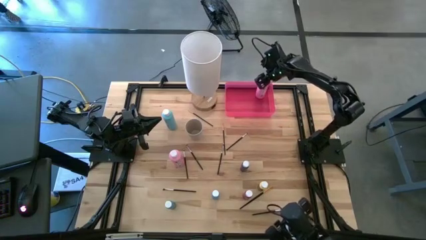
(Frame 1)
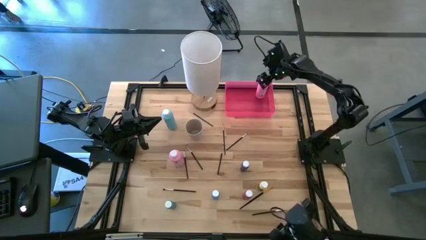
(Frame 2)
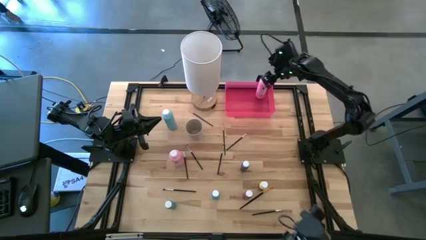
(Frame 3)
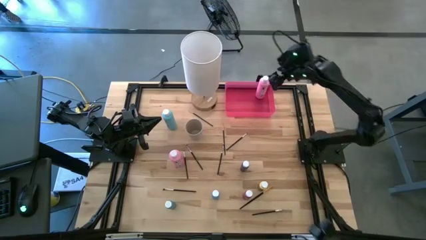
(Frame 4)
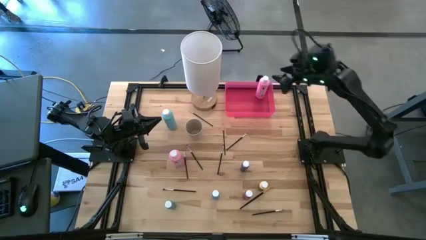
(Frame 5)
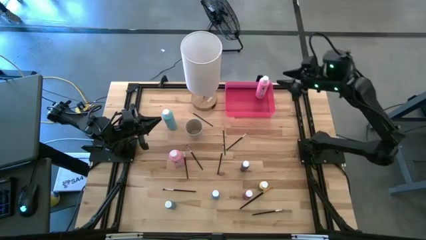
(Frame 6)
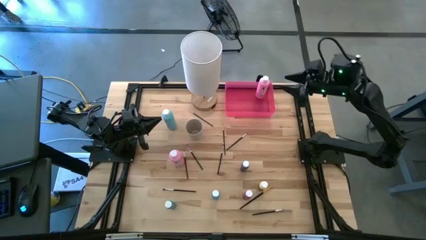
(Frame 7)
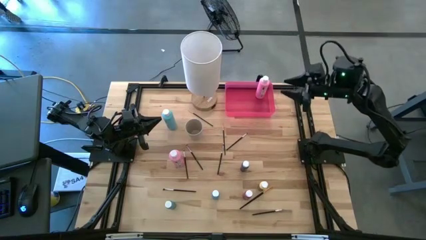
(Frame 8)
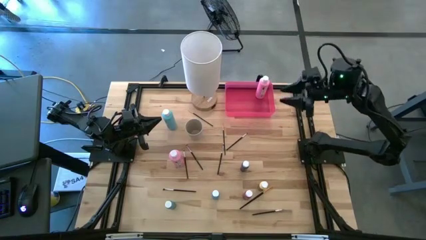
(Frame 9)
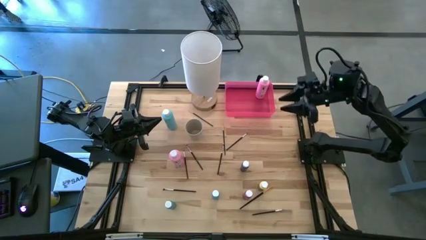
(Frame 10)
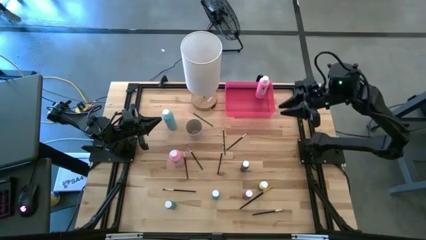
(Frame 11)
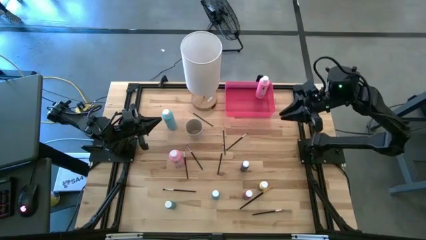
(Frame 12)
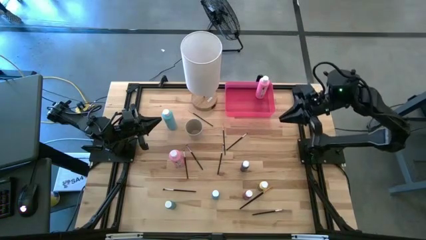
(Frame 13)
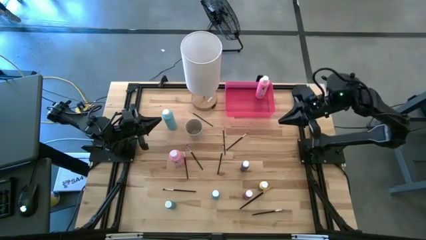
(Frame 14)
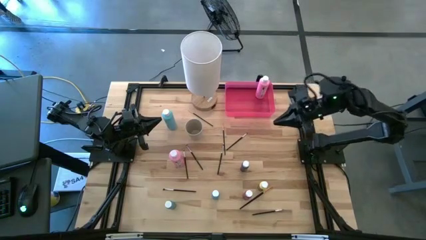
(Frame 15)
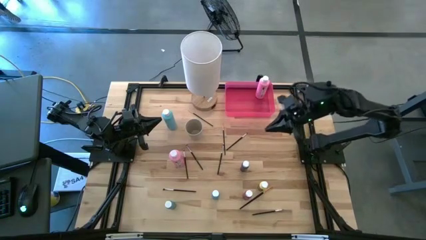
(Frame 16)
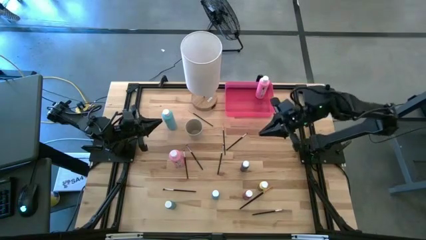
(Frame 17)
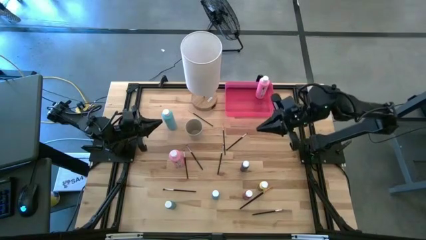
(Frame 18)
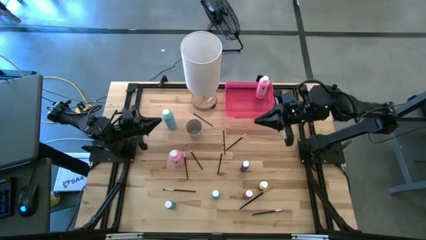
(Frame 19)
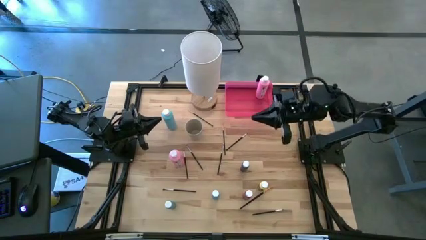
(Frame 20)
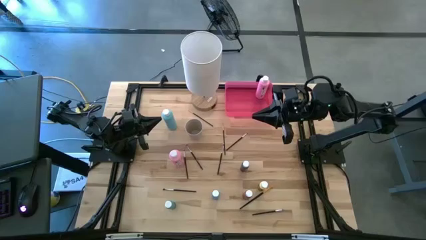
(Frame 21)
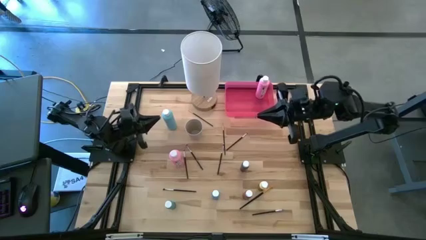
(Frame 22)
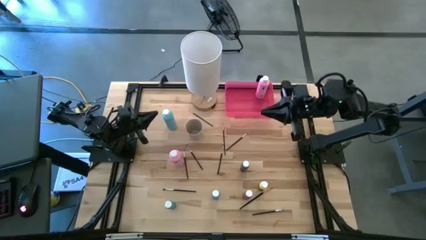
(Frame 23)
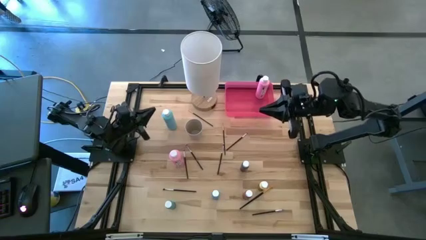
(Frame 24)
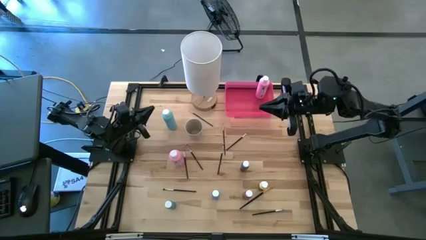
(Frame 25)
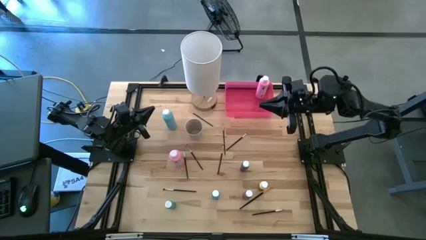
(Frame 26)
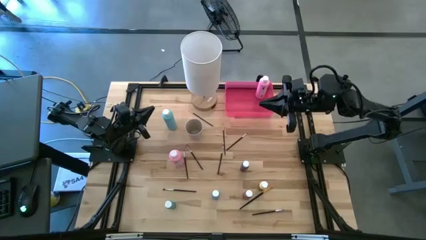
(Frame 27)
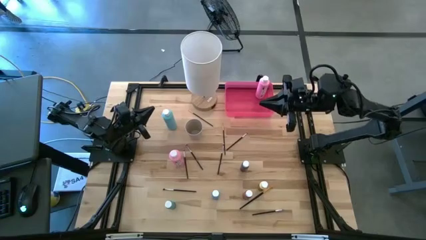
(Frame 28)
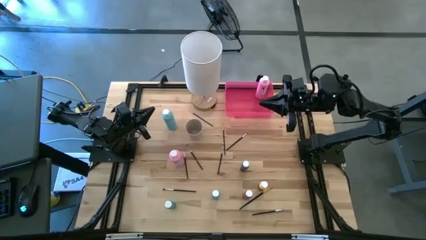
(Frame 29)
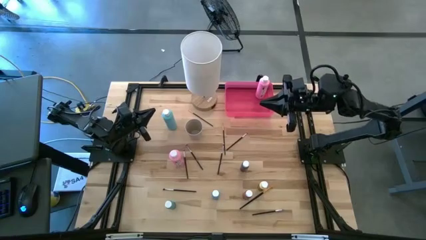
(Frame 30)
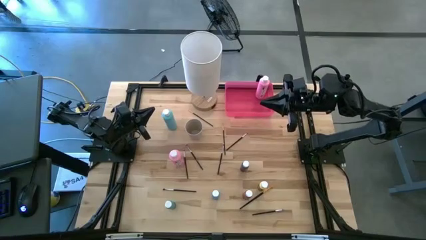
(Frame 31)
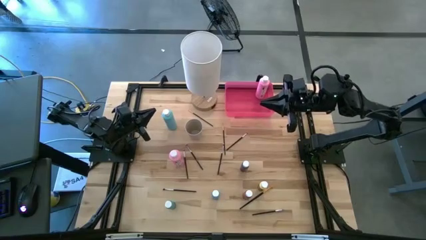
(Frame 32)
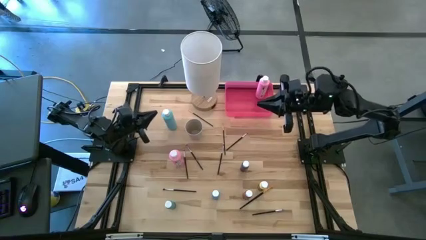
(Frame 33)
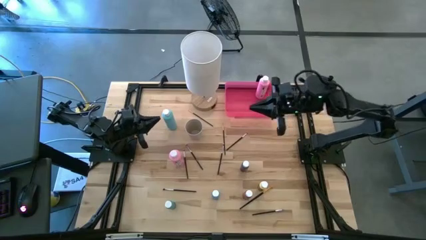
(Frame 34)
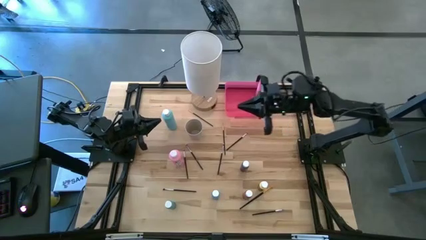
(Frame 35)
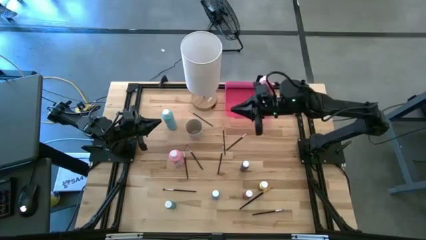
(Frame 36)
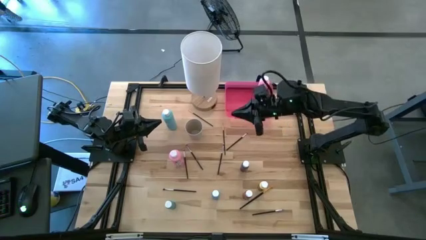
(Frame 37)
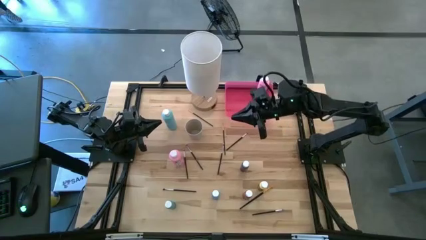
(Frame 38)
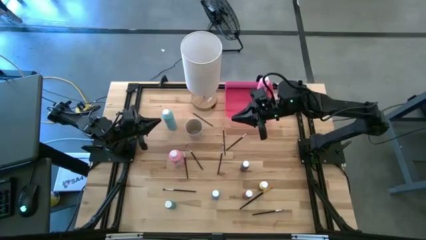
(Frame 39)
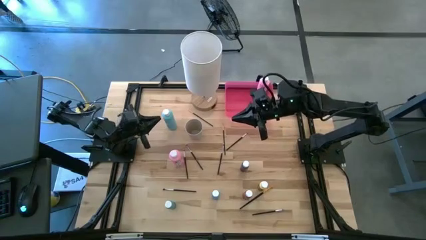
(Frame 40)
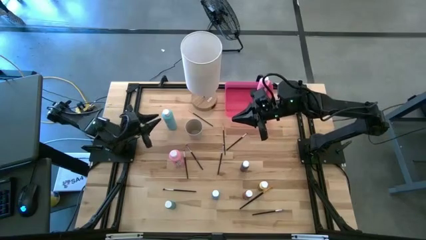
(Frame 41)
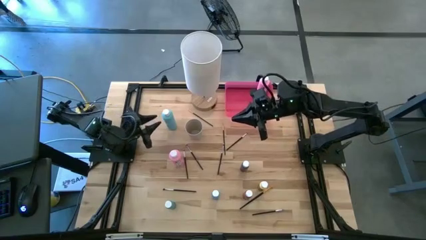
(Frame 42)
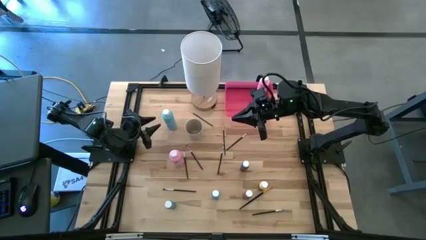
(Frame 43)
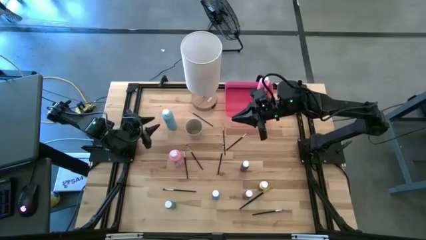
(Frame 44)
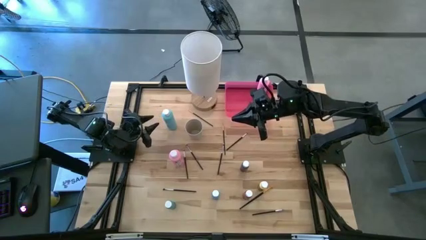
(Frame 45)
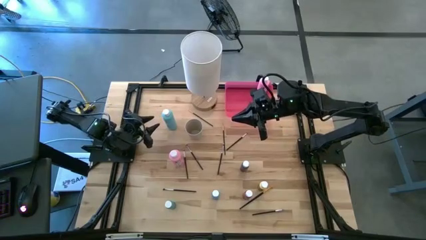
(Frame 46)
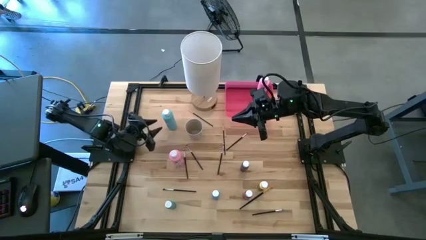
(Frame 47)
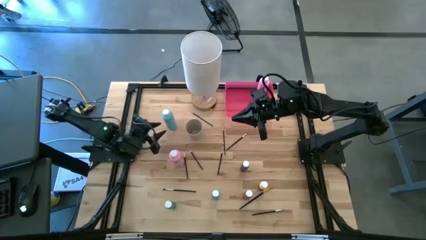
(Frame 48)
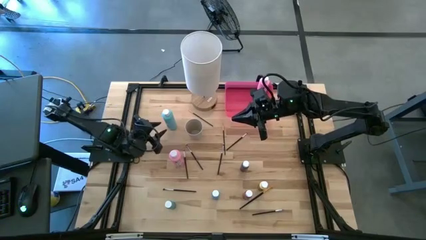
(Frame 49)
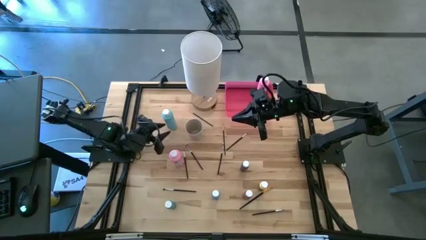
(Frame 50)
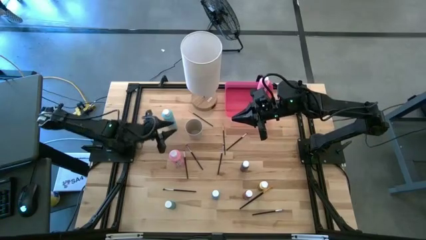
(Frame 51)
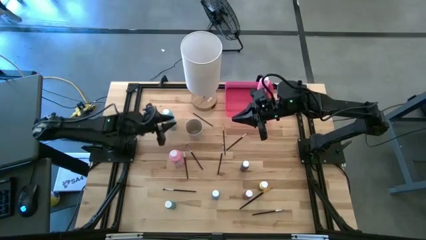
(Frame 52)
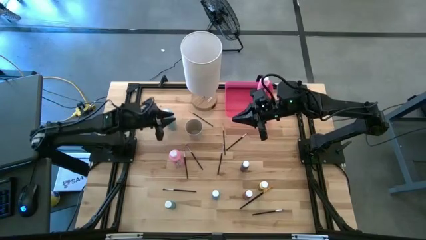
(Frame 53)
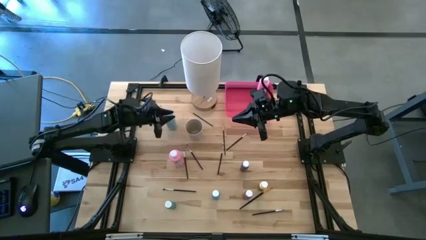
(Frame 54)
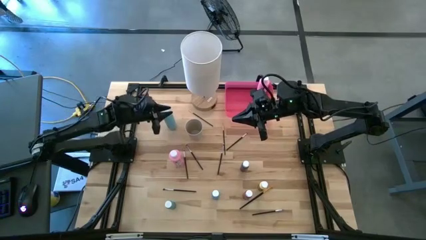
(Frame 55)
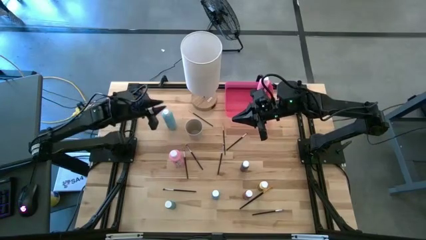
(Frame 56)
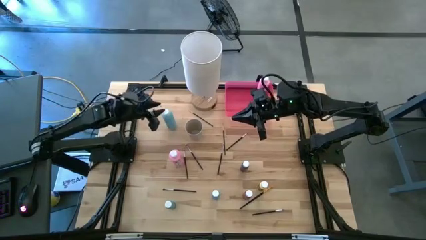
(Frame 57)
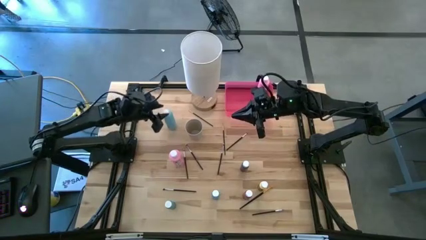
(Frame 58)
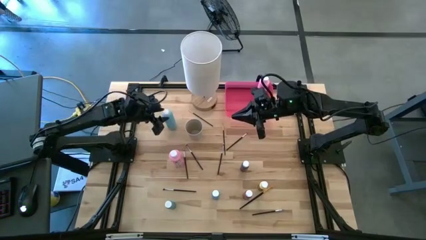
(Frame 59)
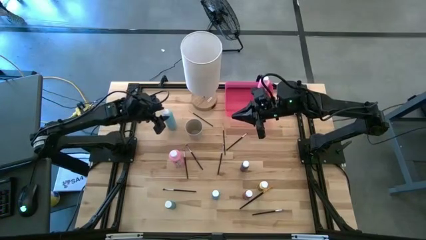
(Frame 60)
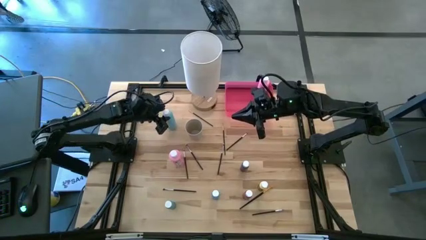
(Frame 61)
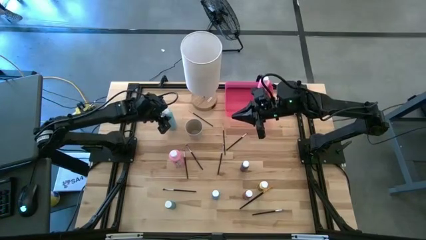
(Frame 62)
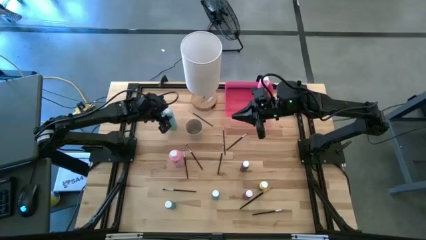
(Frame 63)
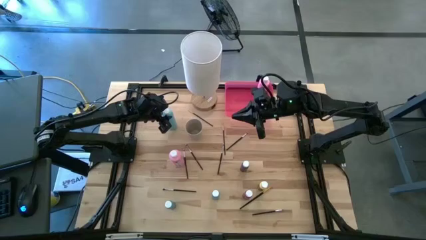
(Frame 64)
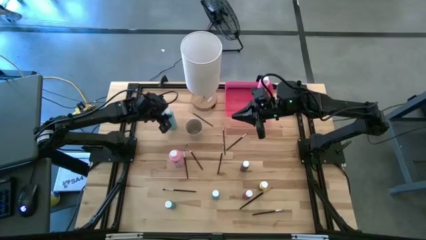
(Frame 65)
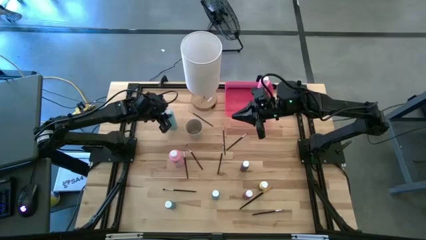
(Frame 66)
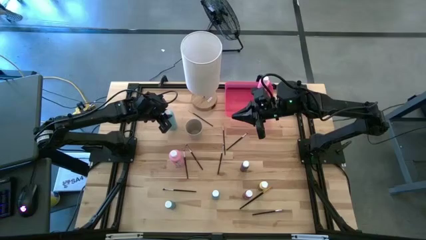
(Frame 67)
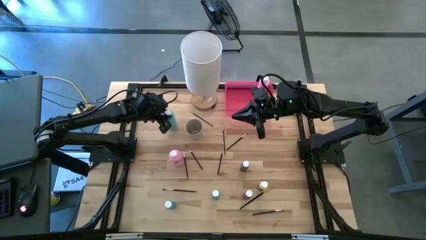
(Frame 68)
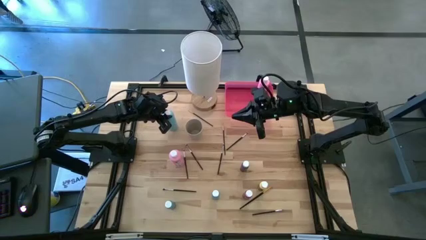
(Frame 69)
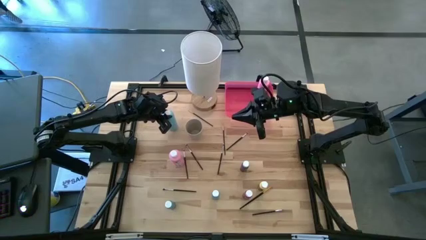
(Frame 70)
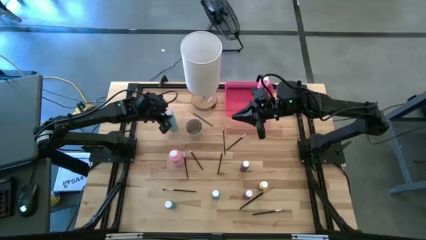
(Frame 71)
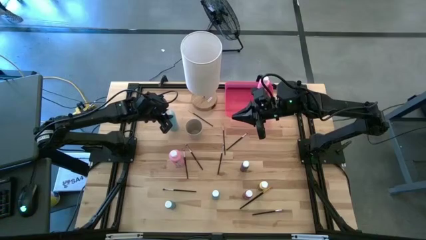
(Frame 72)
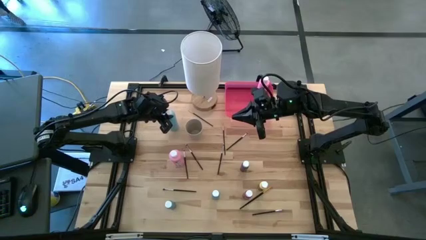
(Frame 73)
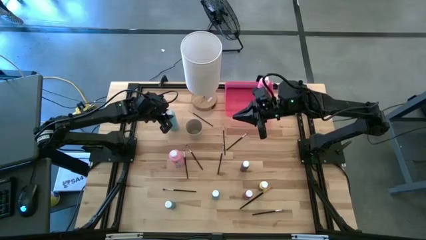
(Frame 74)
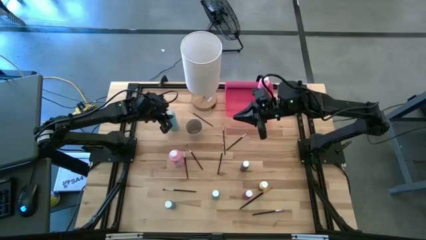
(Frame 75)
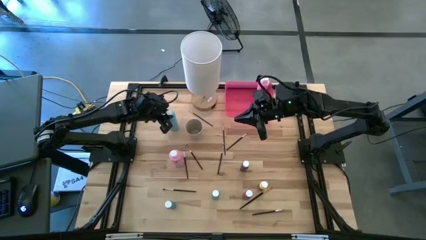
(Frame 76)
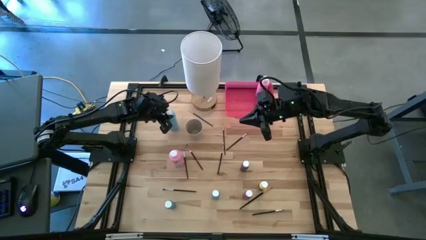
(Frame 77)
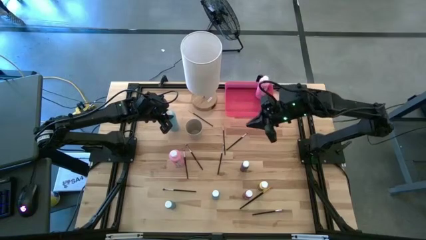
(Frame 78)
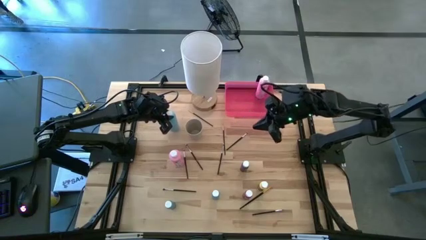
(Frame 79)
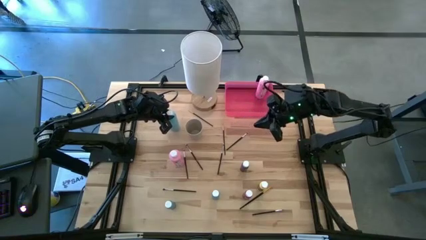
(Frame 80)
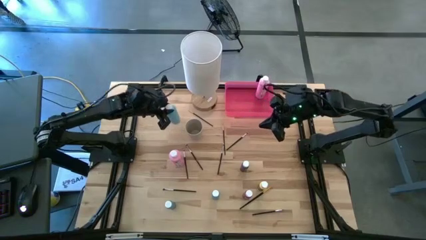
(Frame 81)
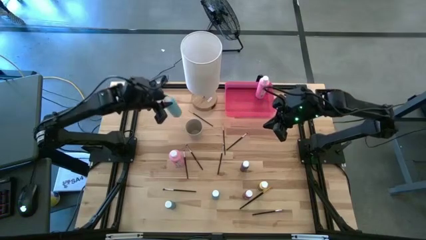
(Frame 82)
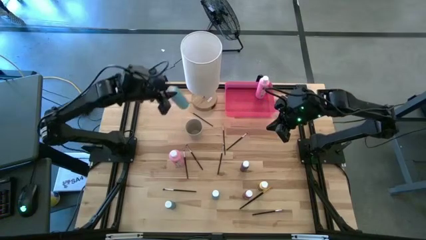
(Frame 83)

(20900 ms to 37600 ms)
Task: Pick & Place Paint Supplies
Put the big blue paint bottle into the pink bin
